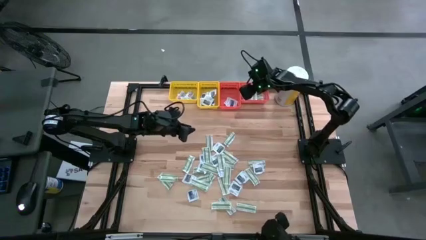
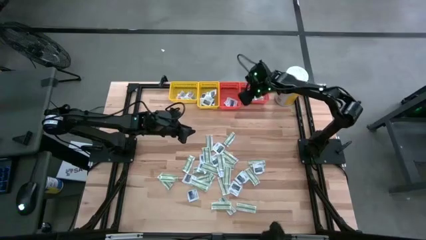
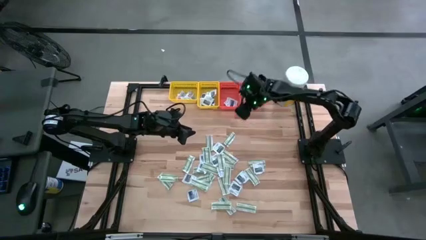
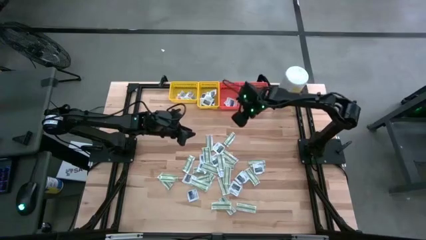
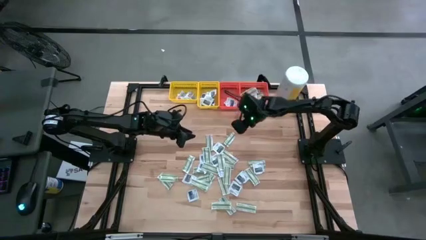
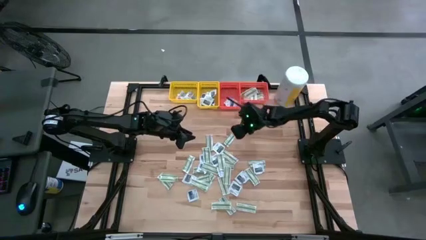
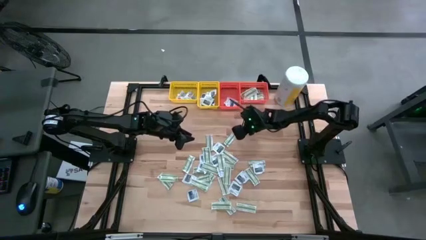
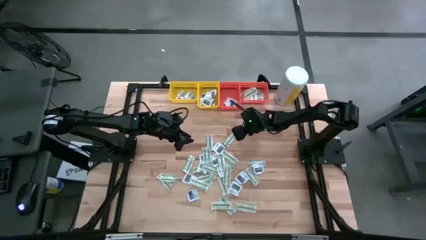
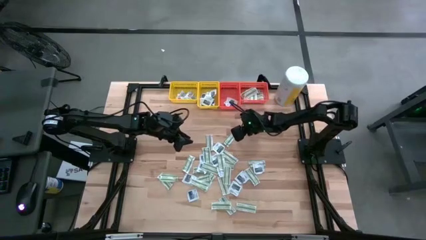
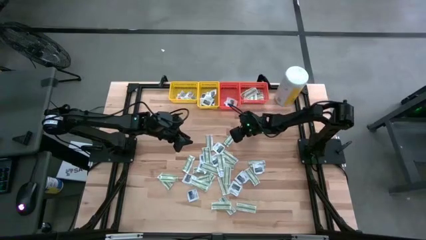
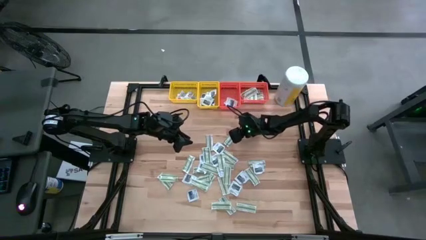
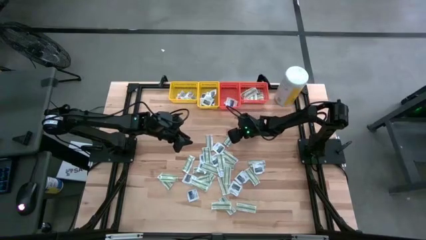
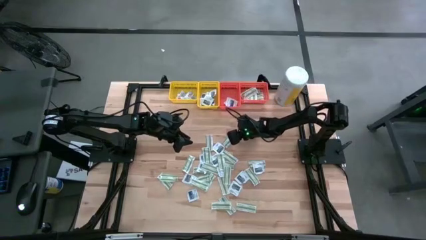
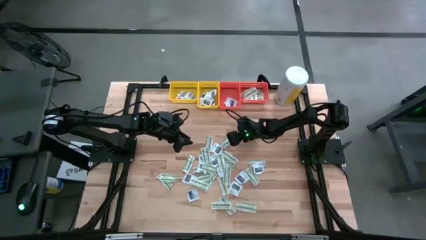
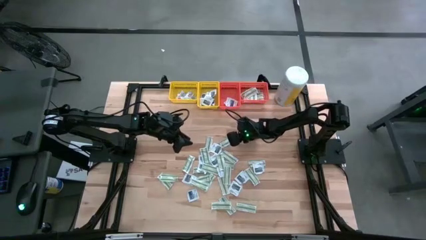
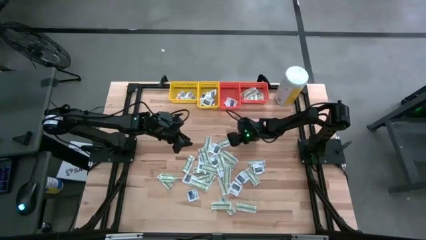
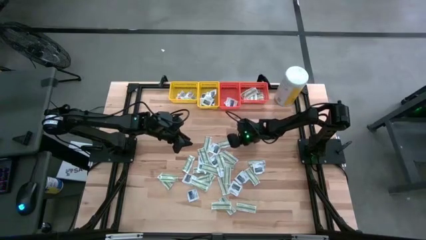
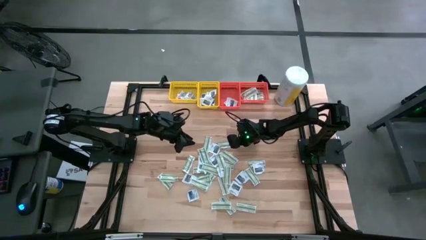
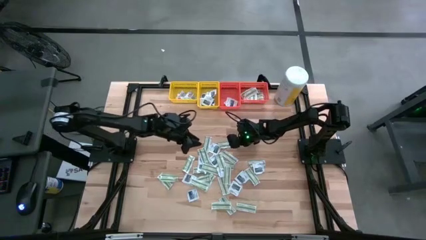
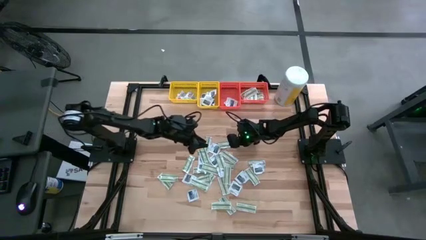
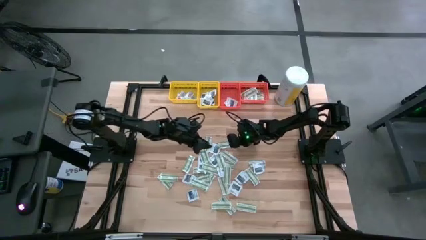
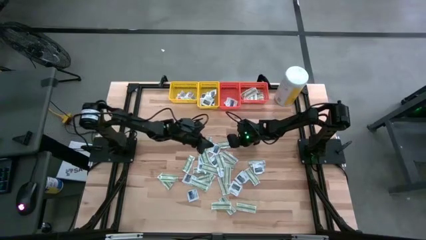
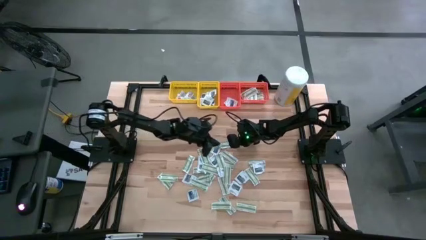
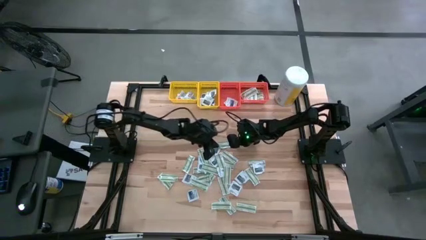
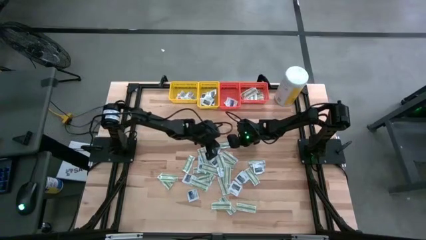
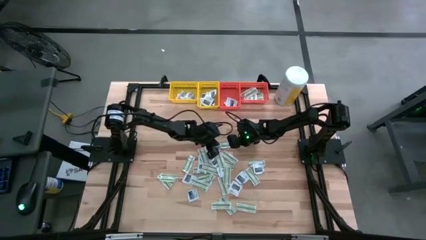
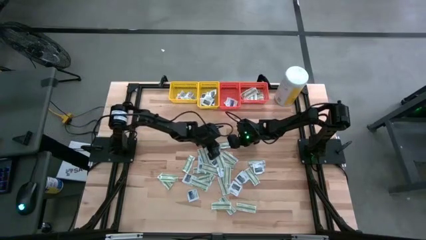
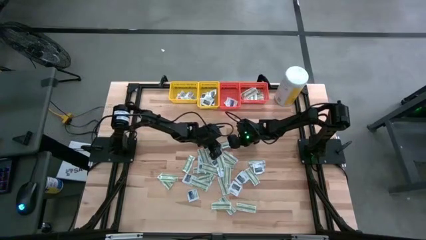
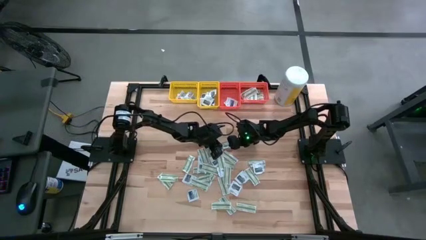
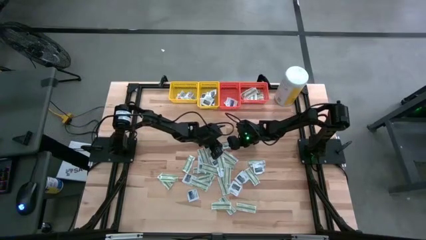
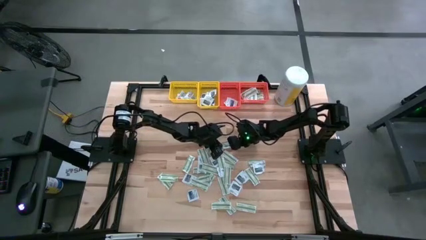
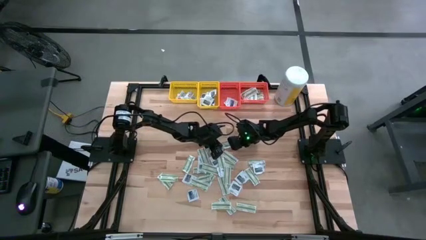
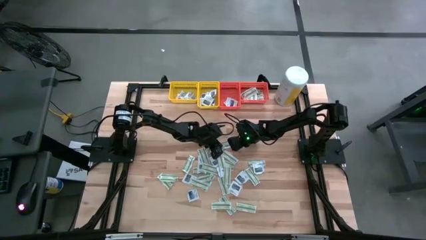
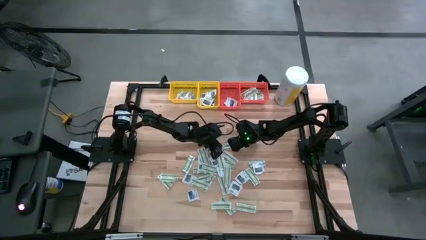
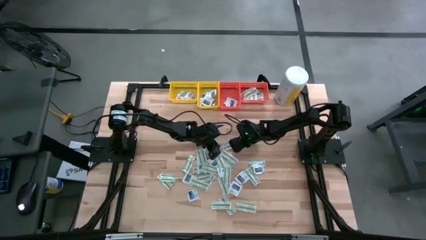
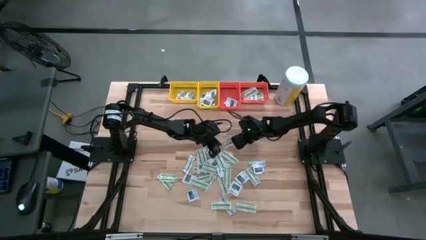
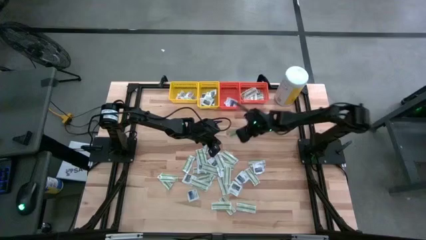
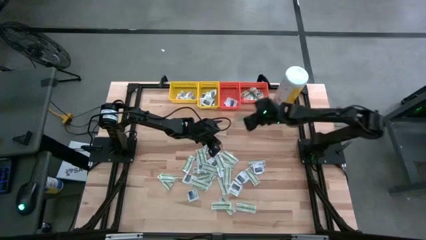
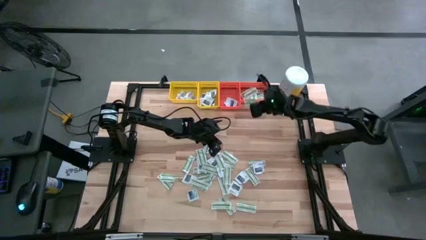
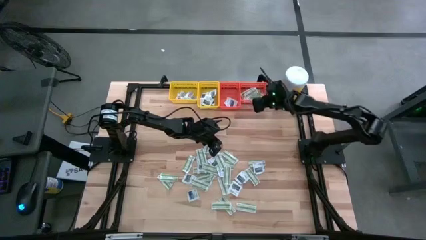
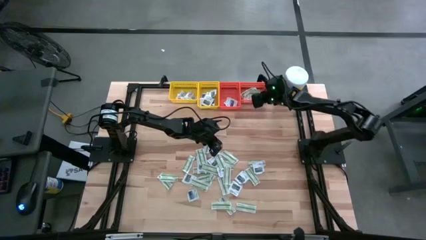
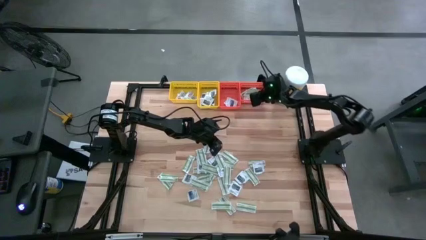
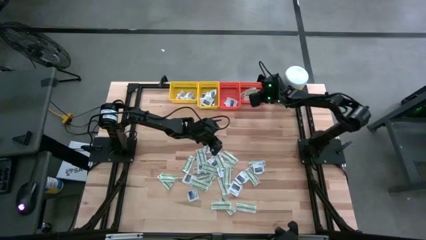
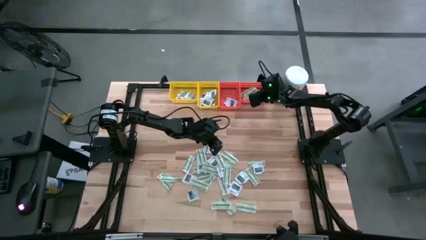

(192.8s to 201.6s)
Task: Pick & Place First Aid Supplies
Put the green pad into the right orange bin

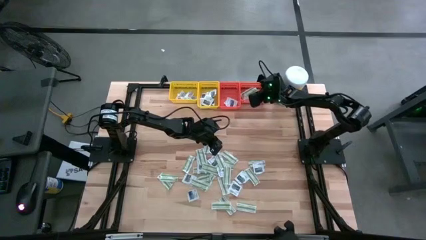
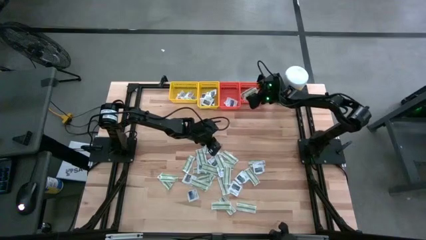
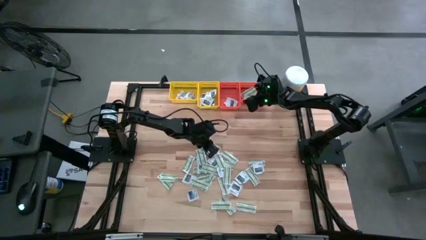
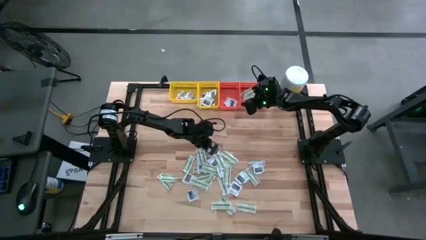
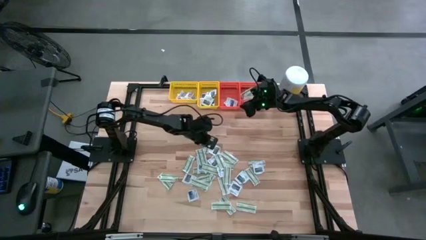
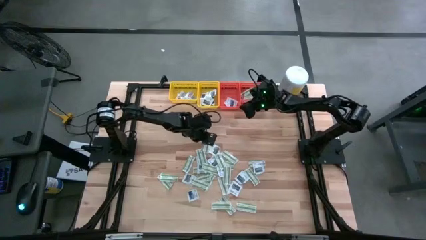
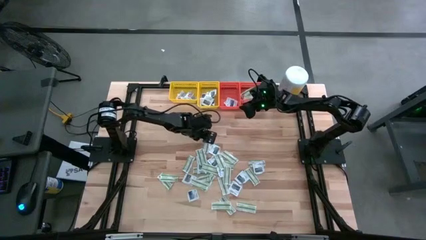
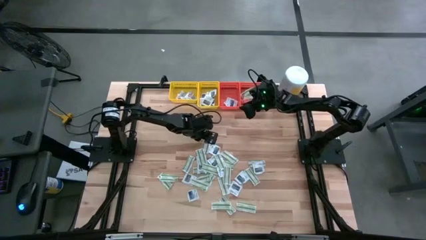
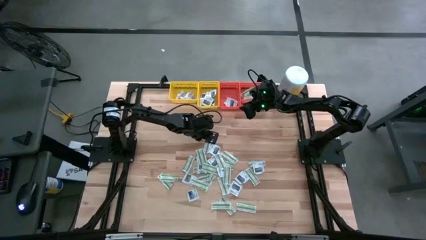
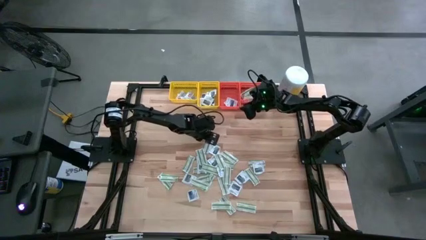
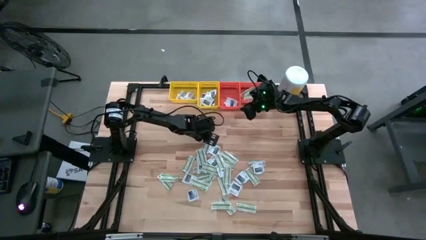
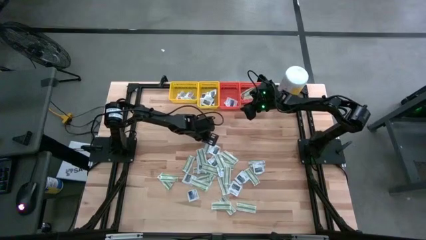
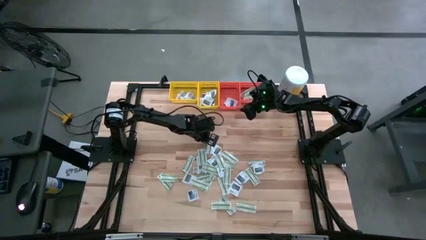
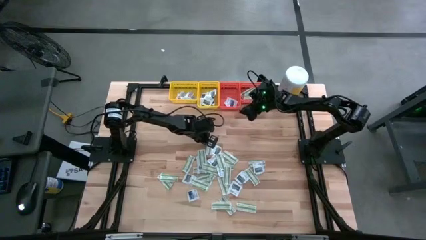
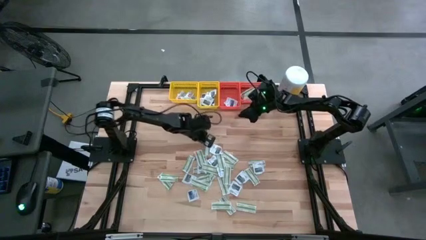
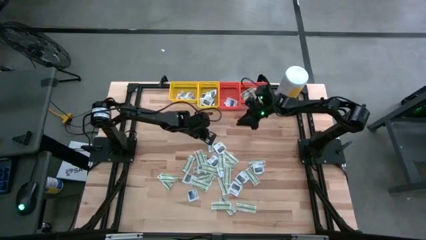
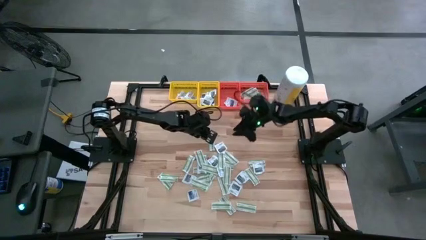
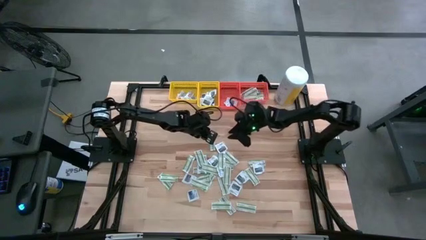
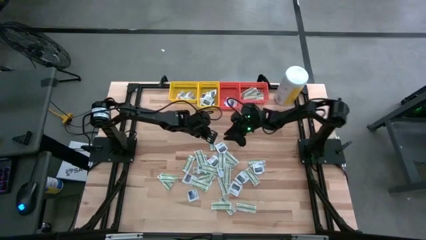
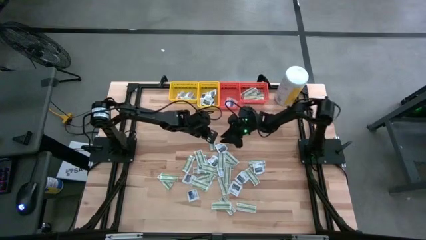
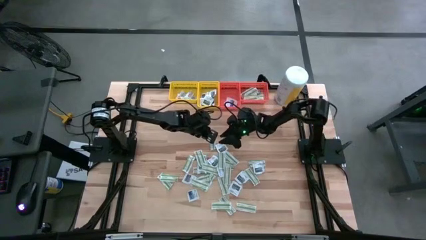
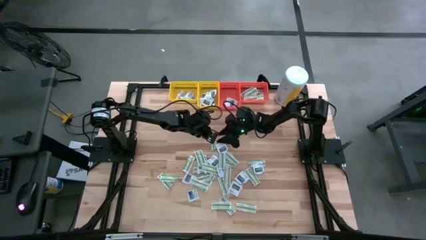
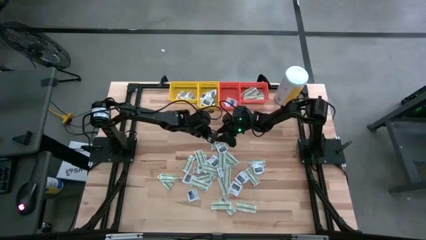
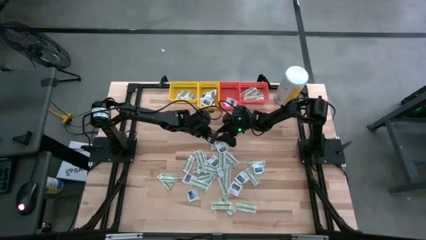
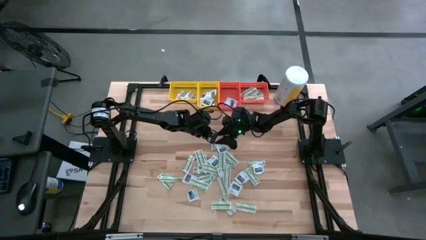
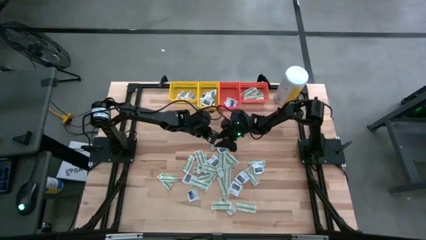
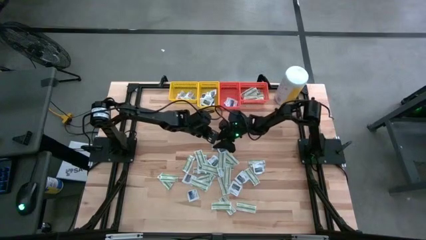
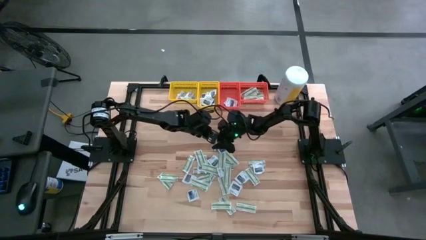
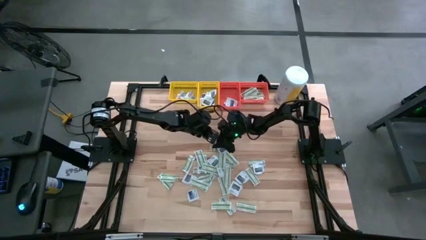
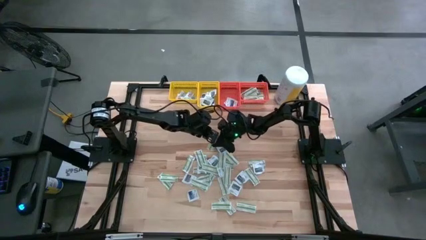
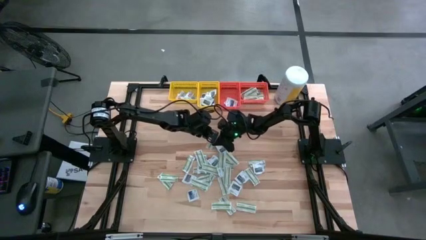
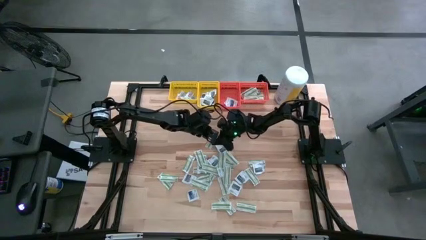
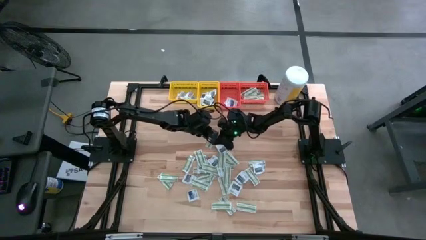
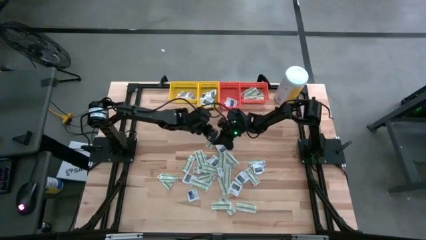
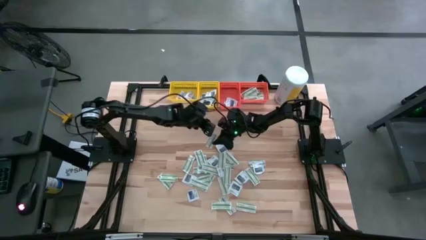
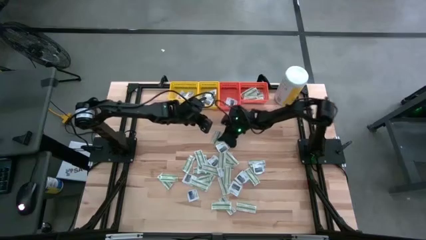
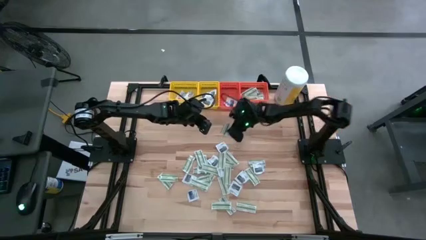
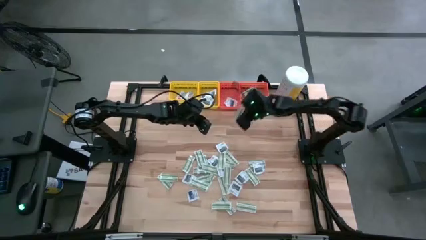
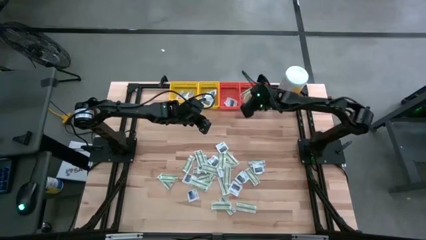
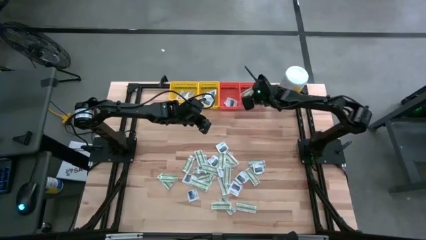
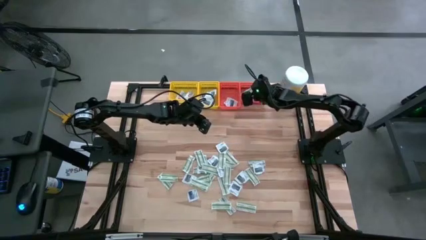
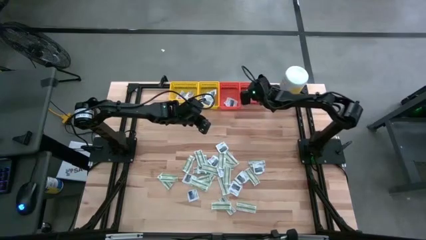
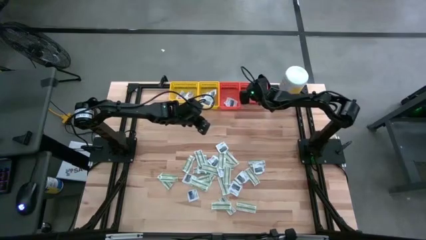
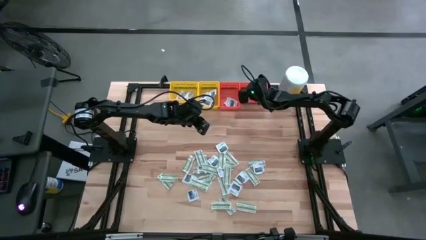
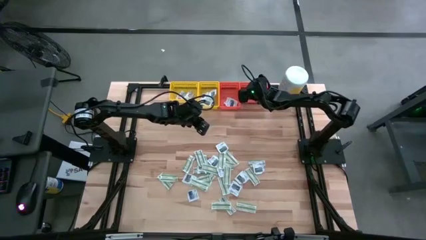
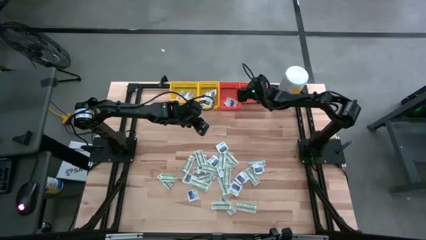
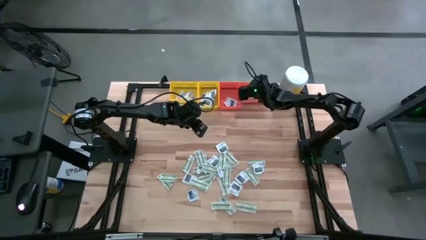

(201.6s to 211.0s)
Put the green pad into the right orange bin
